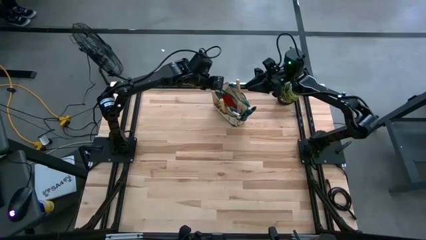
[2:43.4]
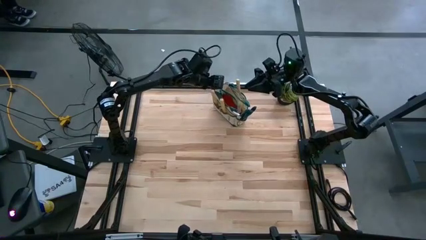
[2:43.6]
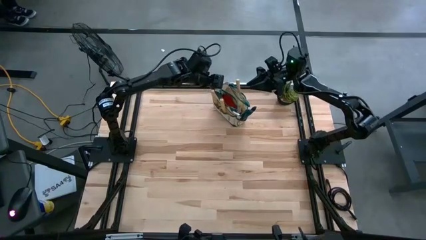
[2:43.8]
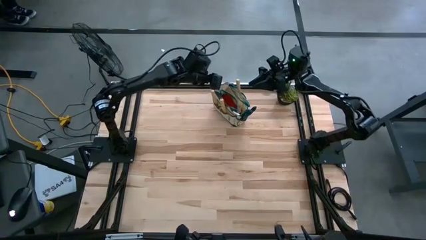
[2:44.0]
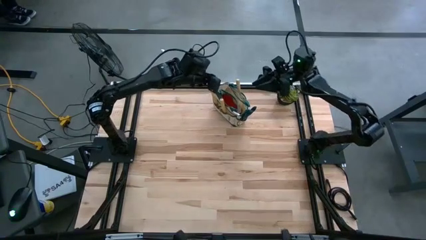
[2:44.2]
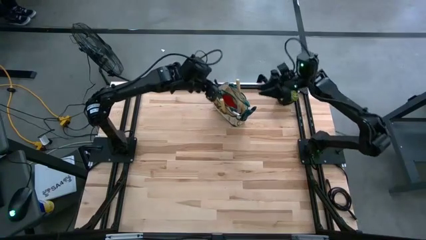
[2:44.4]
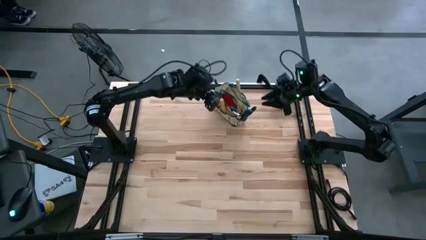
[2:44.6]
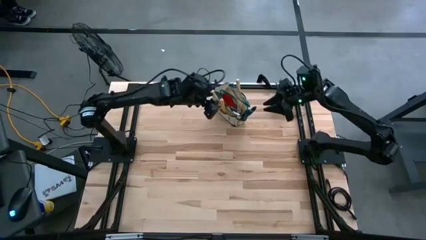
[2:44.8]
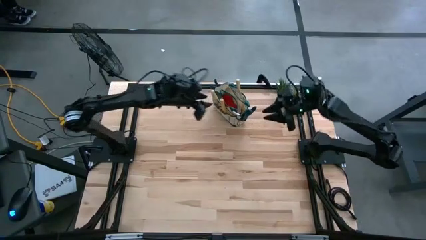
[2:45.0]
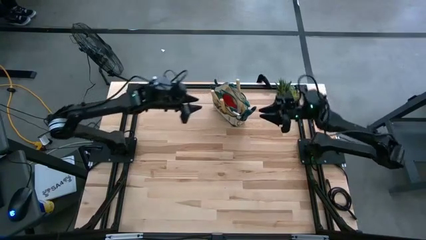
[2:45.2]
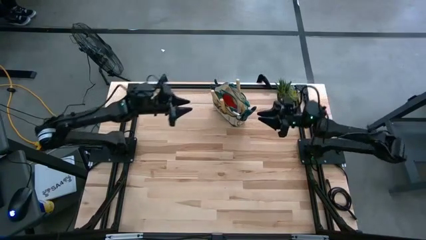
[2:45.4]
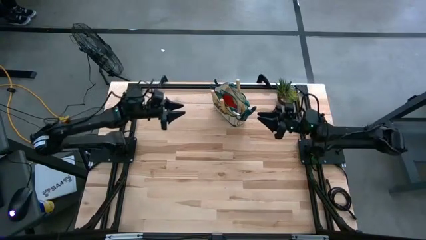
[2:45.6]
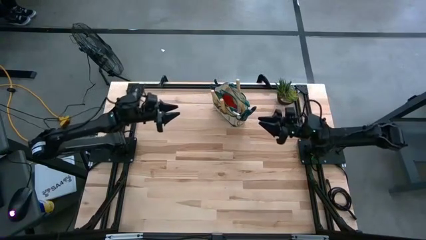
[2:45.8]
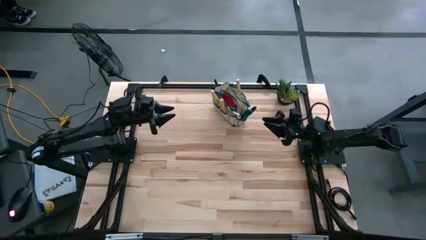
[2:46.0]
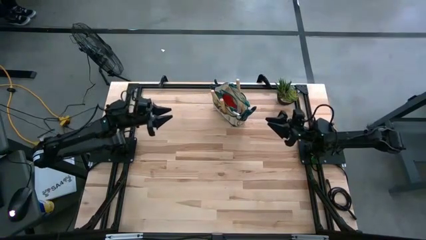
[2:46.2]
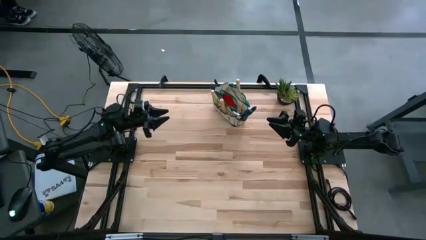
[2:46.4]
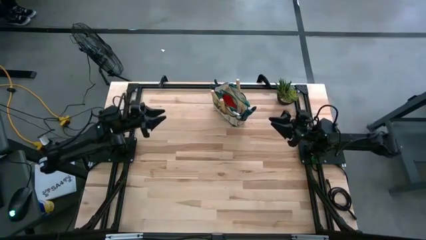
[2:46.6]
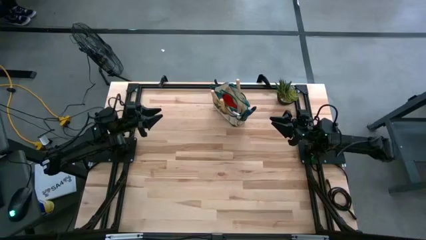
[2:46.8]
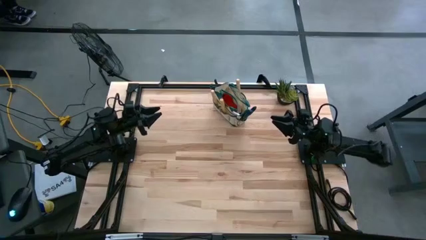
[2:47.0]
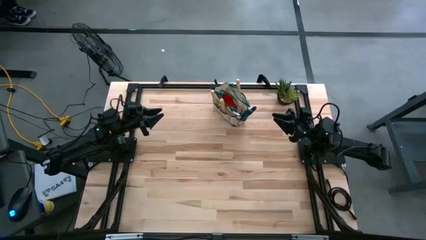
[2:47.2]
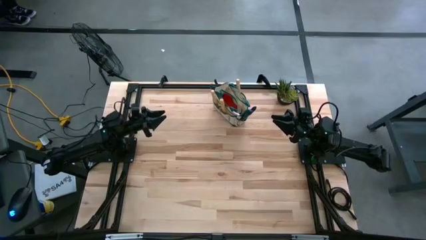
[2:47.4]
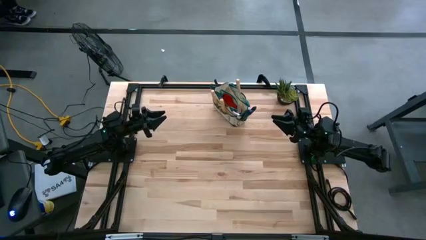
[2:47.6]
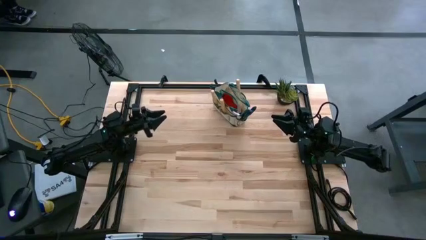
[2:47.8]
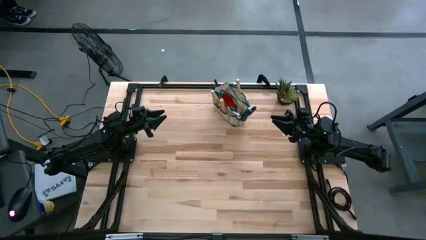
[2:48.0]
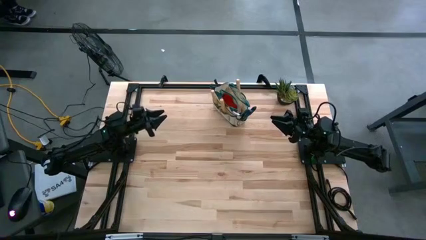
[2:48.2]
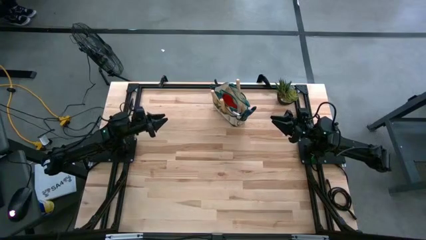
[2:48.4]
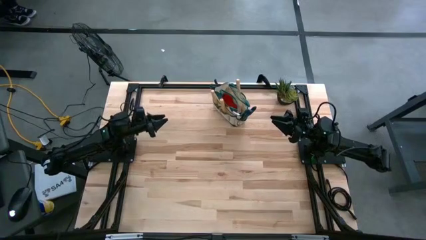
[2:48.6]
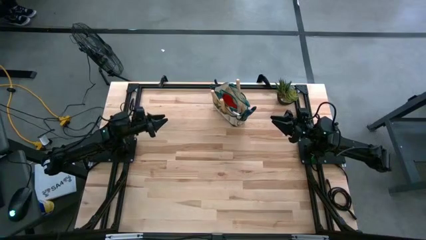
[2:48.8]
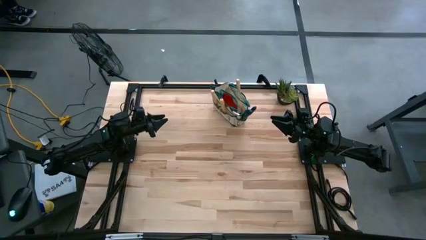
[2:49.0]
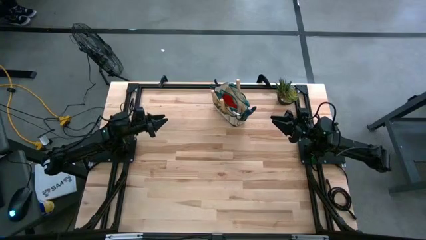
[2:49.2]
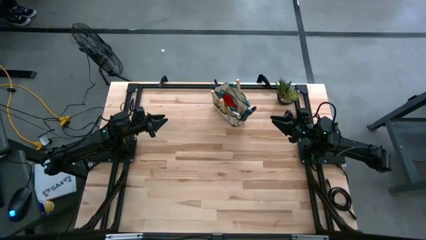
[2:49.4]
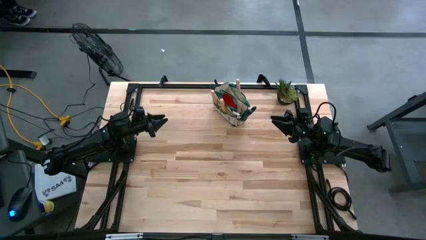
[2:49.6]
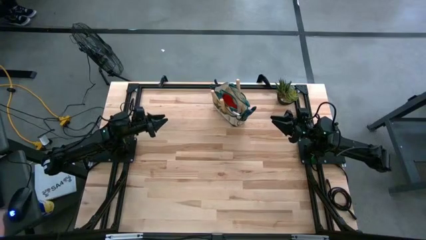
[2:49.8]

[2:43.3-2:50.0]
Task: Pick & Place Garden tools in Gardening bag
Return to Home Position

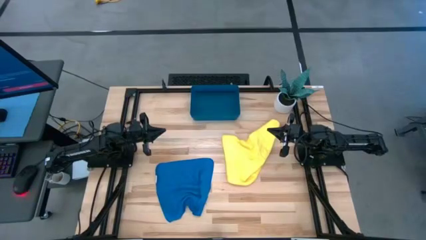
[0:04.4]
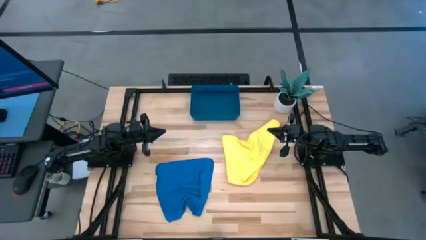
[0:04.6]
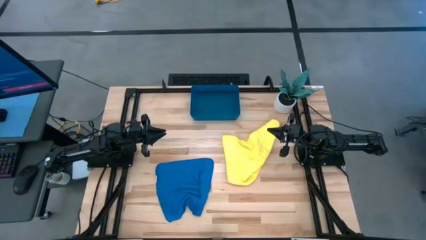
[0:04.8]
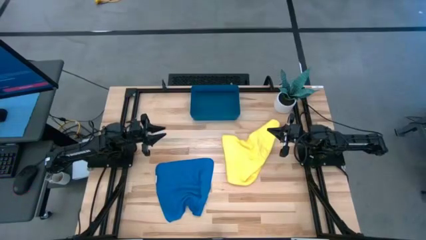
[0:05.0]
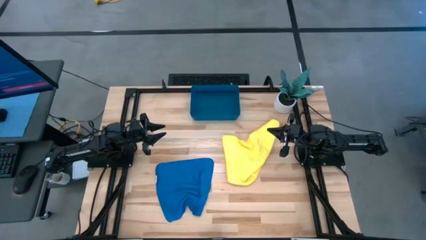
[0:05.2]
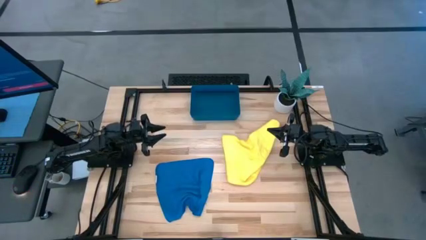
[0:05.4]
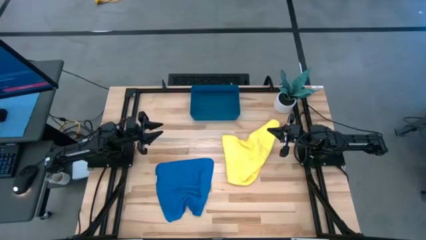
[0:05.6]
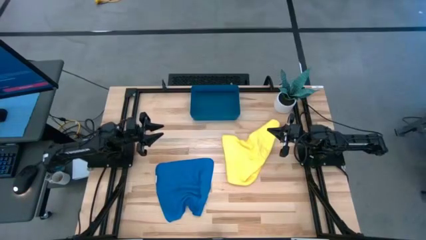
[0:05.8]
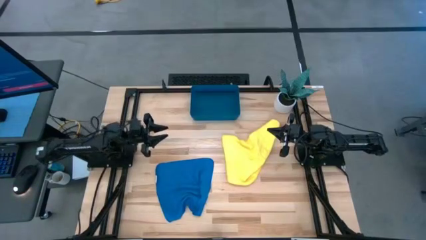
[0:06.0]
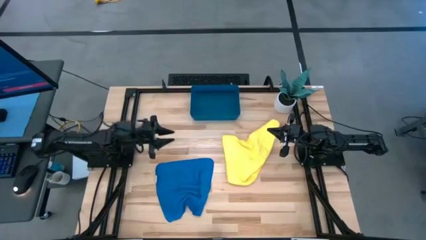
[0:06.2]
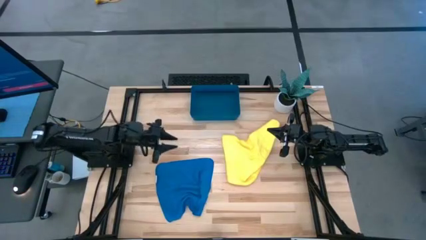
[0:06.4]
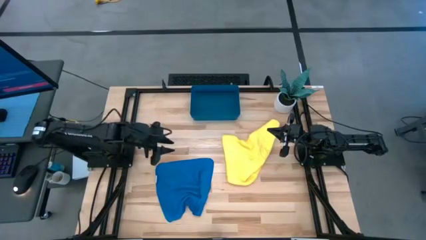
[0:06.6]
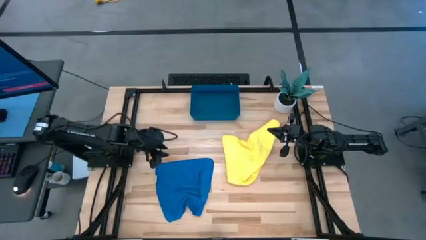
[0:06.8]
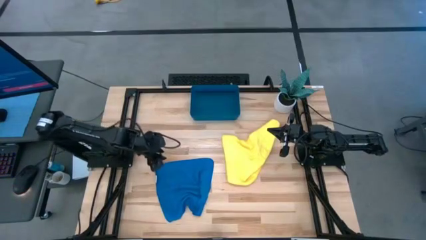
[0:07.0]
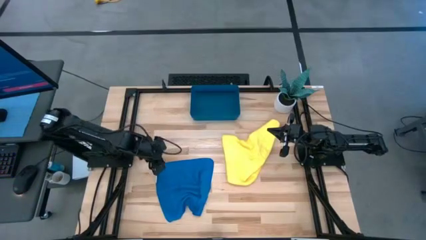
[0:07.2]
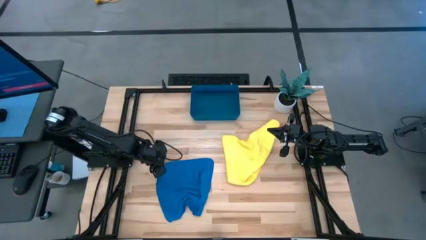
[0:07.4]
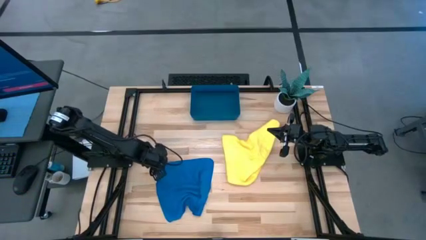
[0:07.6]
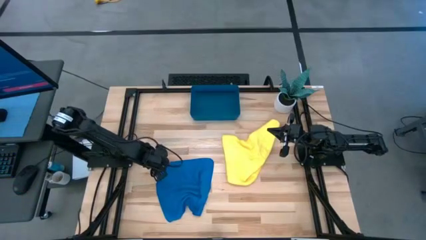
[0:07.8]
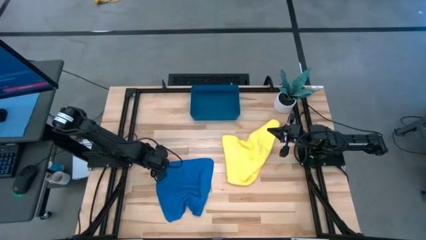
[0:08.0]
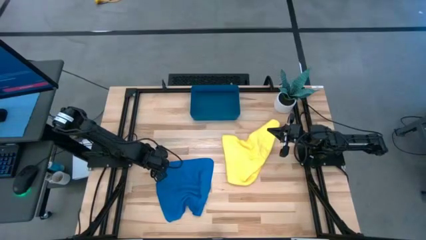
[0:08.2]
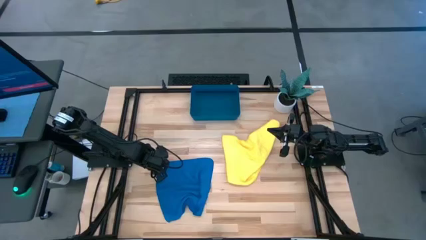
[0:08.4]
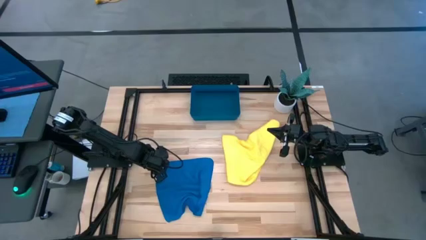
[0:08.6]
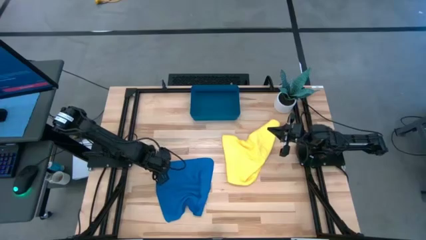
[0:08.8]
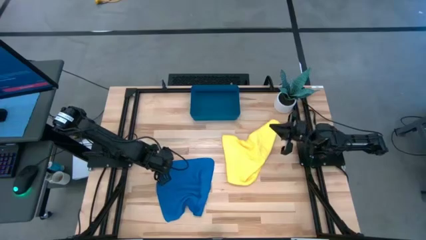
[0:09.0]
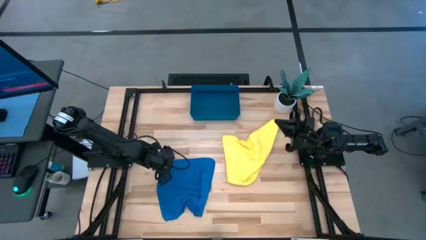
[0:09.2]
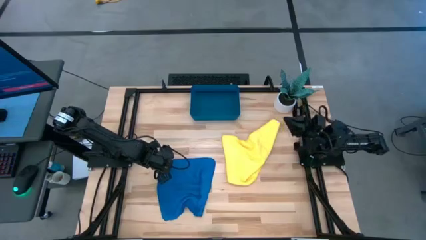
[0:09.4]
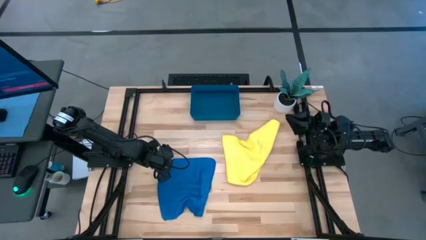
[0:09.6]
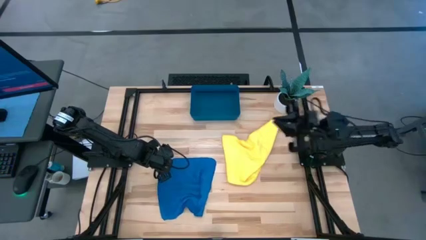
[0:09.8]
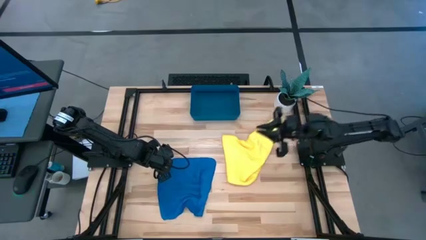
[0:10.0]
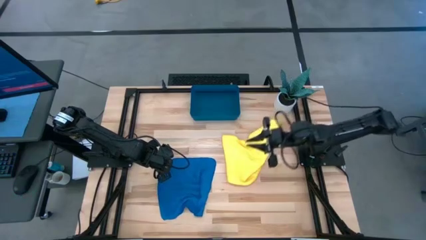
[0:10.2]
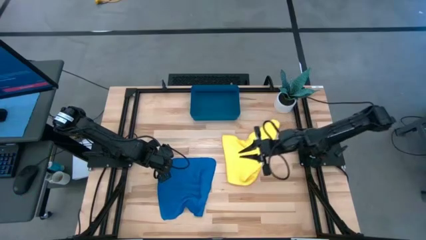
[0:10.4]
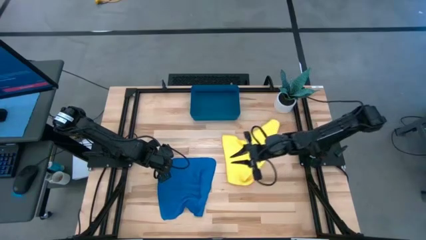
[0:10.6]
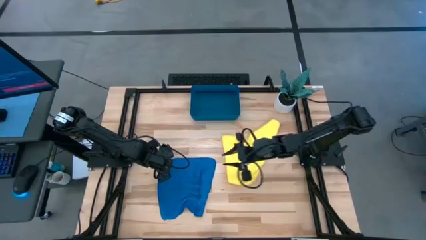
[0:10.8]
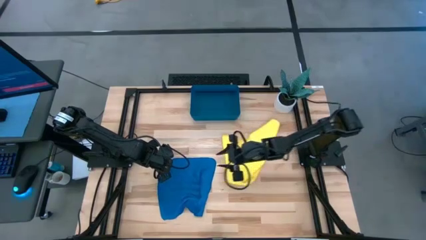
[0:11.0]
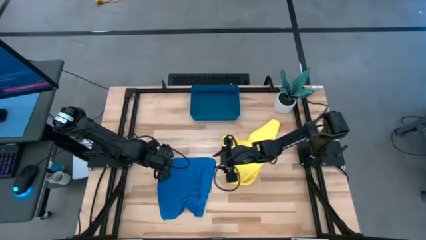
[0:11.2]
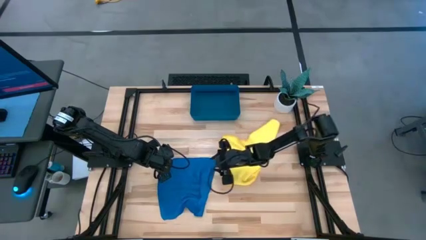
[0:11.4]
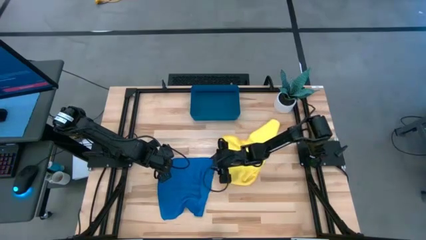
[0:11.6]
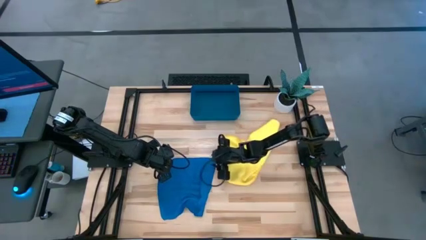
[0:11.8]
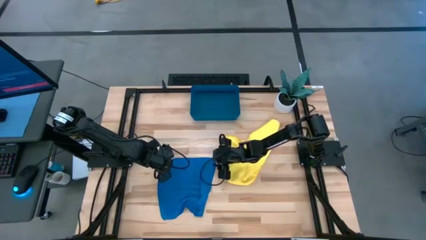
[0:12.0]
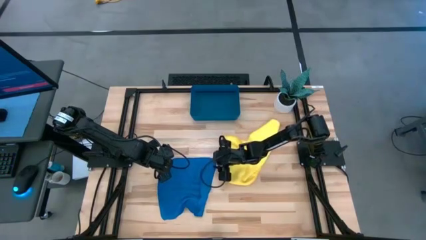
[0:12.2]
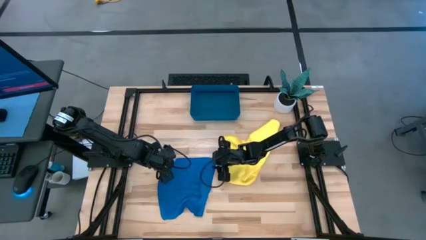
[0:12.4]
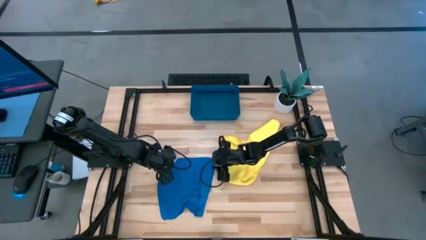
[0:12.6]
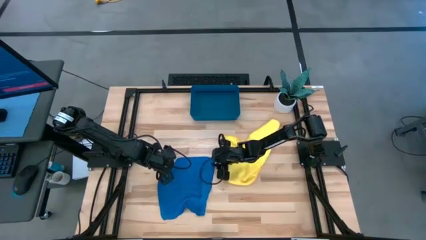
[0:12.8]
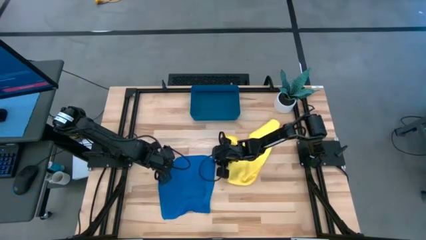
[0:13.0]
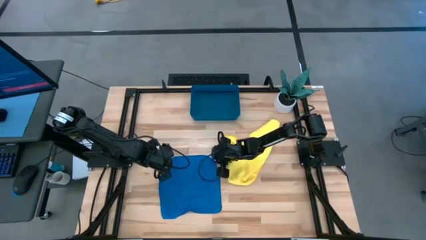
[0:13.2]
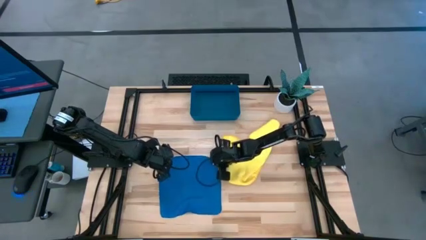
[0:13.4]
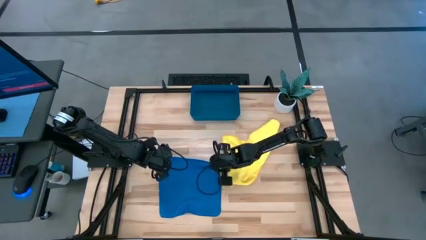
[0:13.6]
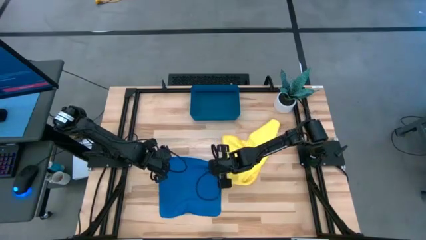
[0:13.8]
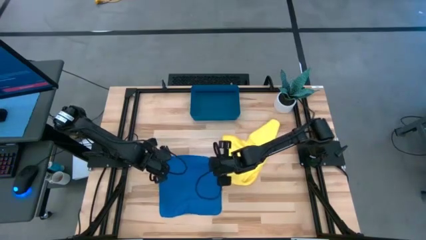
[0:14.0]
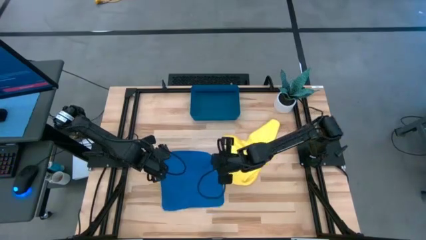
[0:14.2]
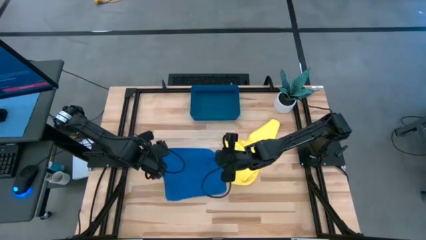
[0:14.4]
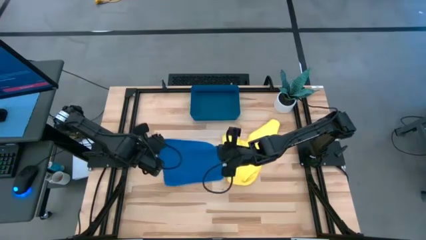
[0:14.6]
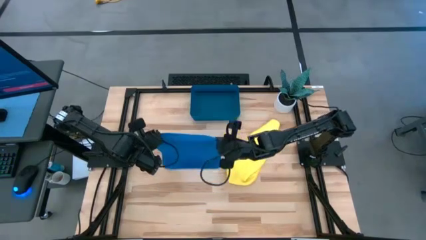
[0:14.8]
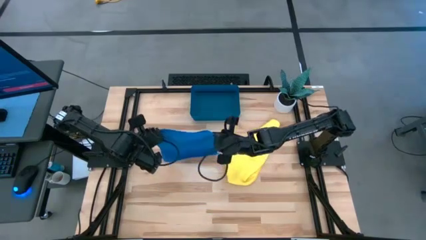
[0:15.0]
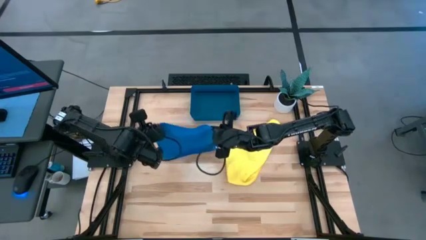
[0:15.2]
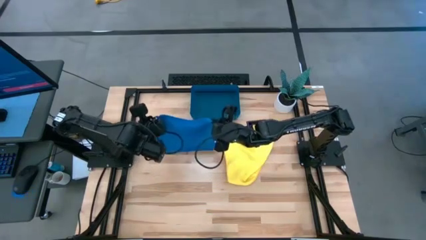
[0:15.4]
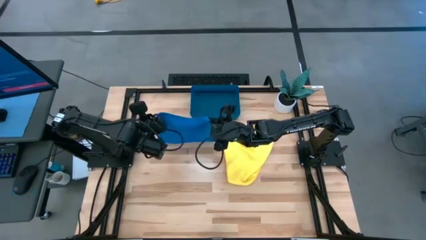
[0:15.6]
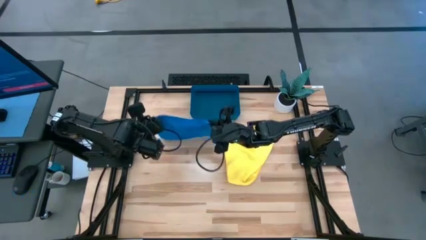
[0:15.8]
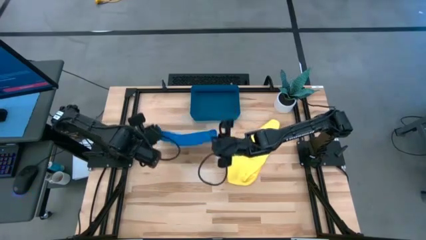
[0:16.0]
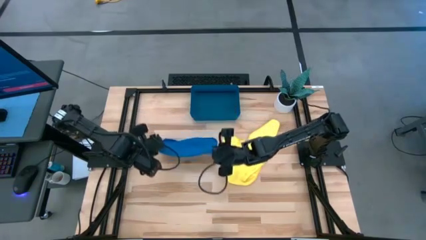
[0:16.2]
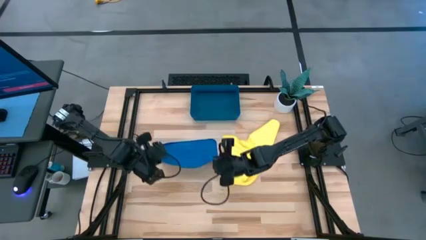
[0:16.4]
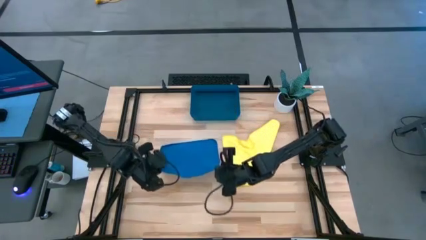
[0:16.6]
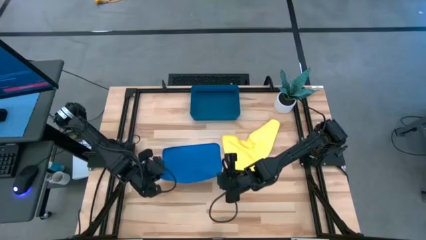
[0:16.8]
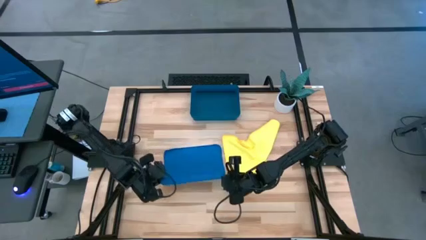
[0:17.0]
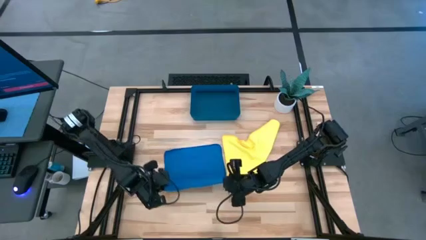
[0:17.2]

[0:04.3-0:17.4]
Task: Roll microfiber towels into tight, uniform cylinder then place into a basket
Fold the blue towel
